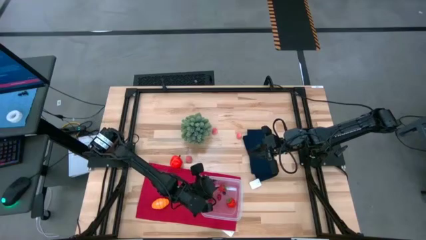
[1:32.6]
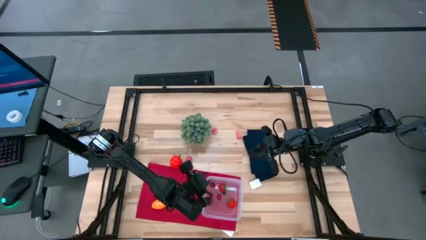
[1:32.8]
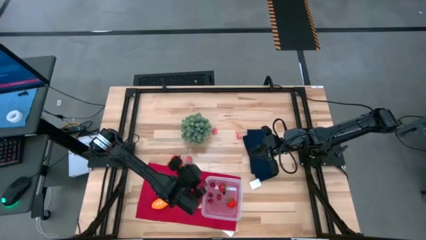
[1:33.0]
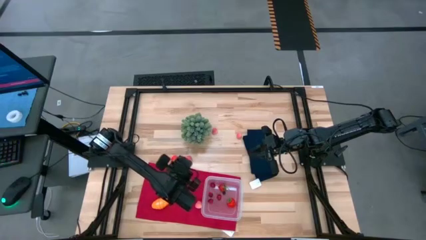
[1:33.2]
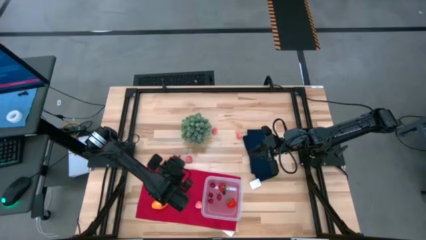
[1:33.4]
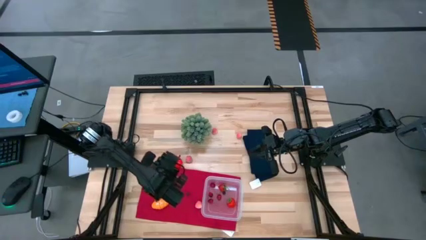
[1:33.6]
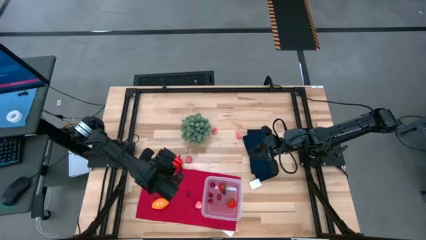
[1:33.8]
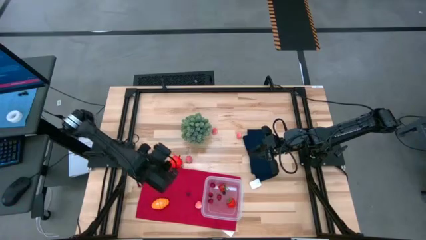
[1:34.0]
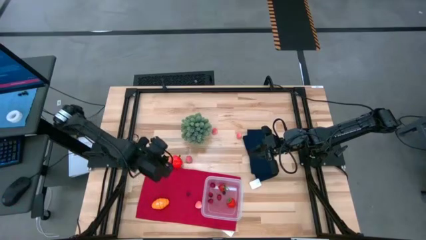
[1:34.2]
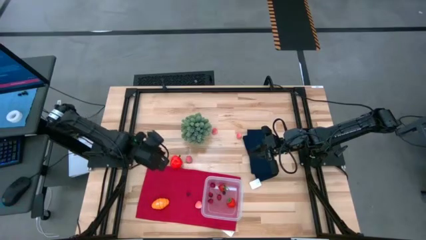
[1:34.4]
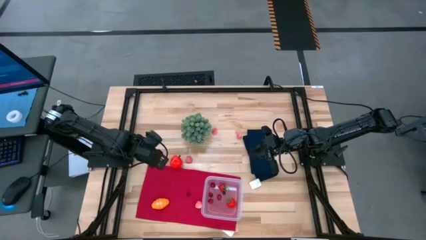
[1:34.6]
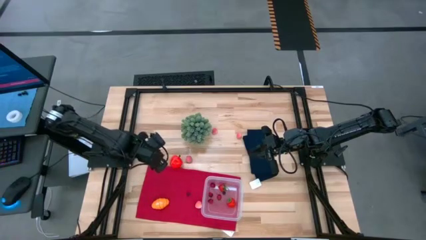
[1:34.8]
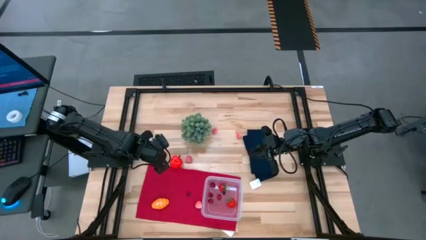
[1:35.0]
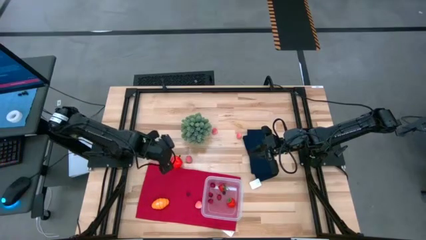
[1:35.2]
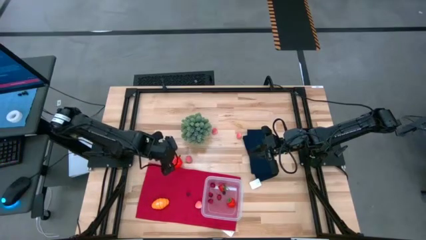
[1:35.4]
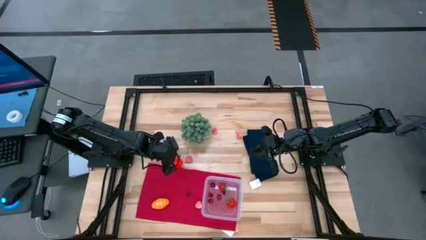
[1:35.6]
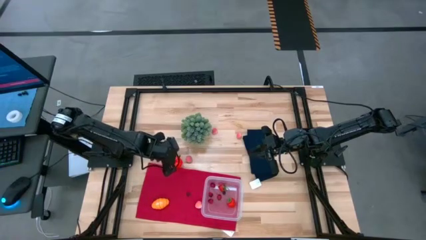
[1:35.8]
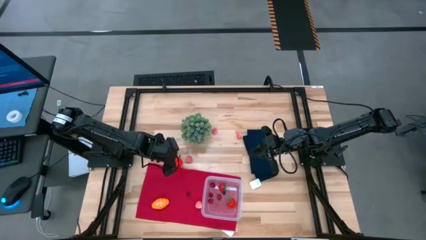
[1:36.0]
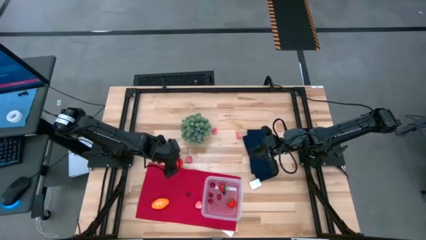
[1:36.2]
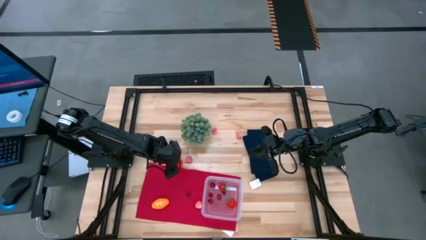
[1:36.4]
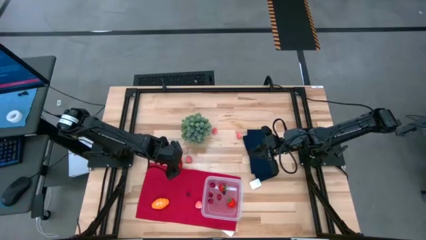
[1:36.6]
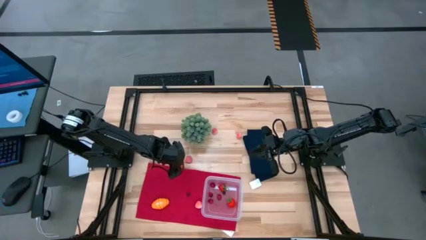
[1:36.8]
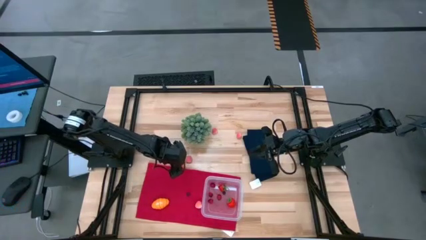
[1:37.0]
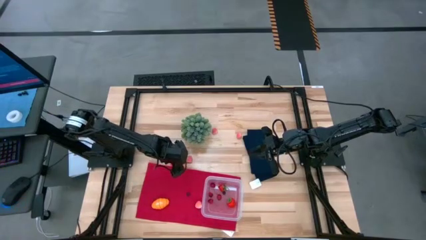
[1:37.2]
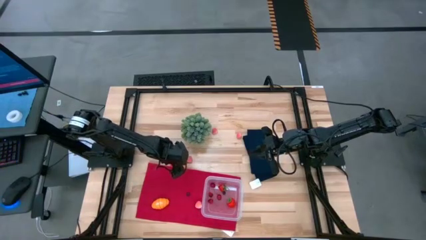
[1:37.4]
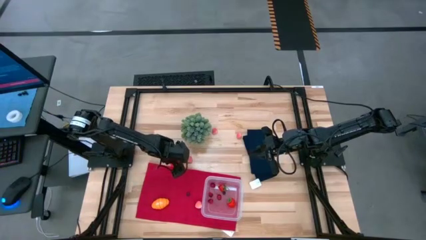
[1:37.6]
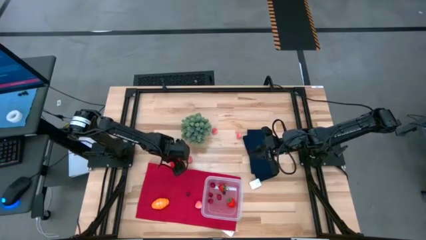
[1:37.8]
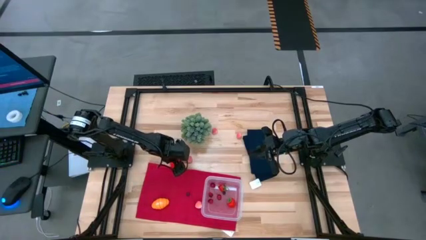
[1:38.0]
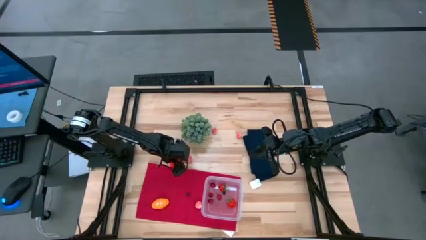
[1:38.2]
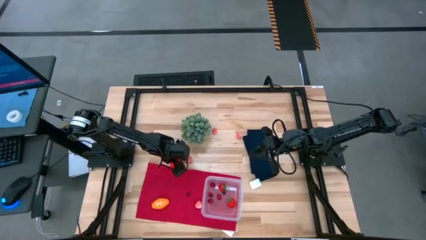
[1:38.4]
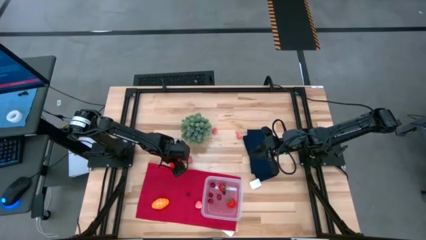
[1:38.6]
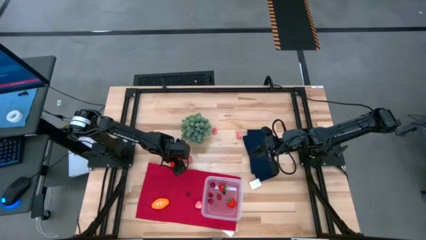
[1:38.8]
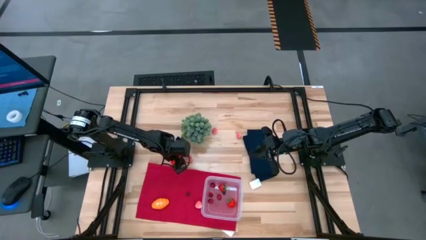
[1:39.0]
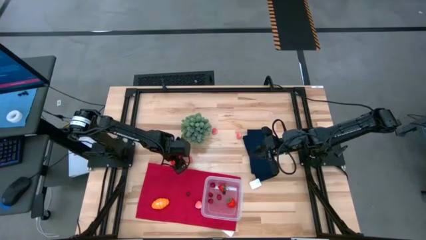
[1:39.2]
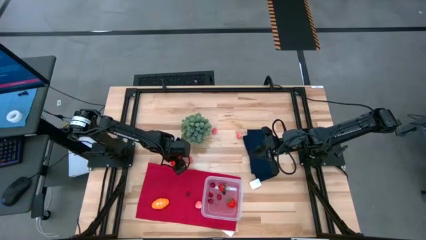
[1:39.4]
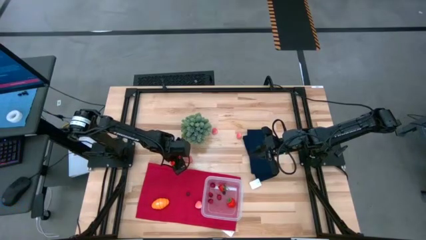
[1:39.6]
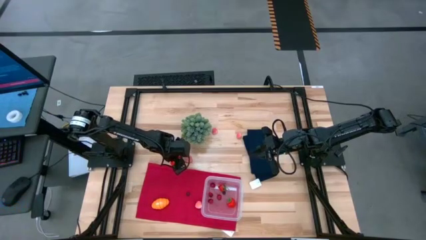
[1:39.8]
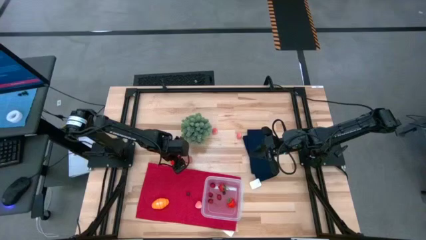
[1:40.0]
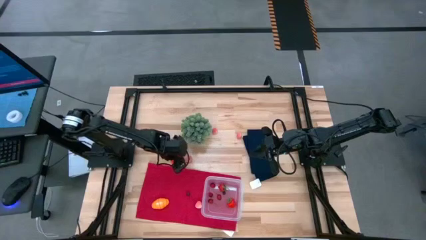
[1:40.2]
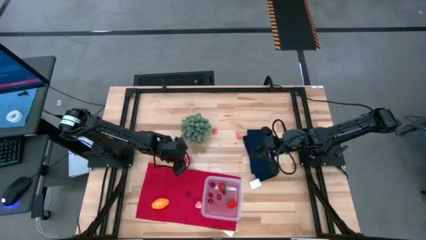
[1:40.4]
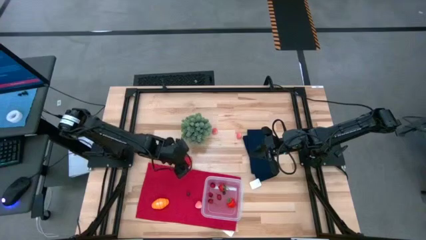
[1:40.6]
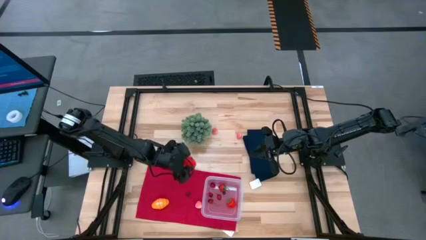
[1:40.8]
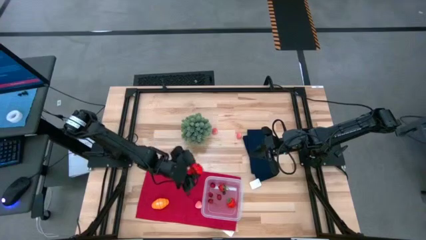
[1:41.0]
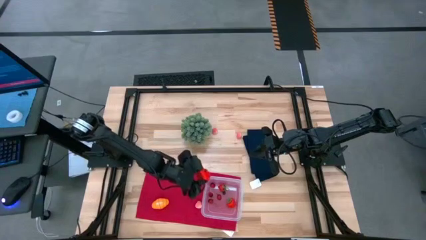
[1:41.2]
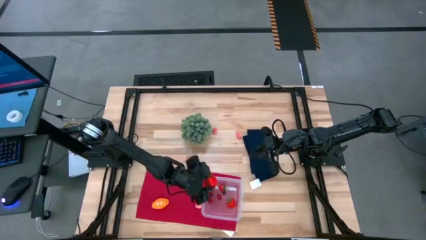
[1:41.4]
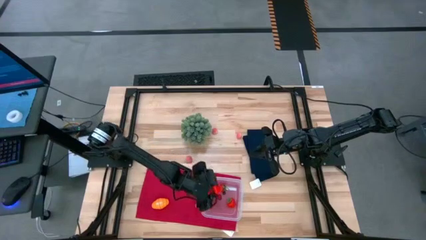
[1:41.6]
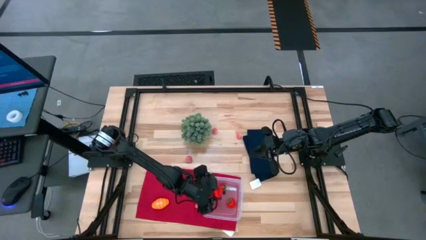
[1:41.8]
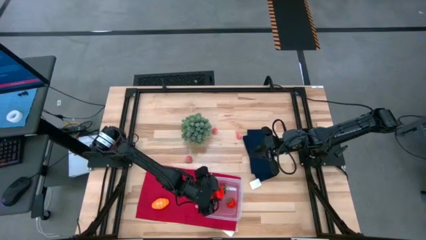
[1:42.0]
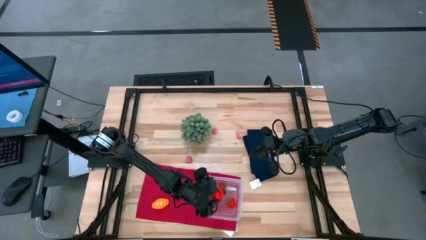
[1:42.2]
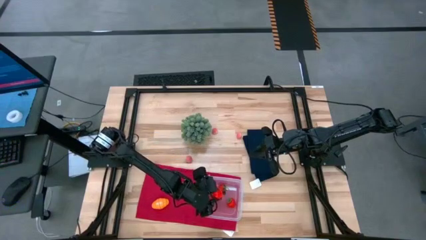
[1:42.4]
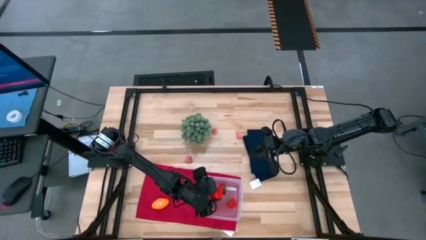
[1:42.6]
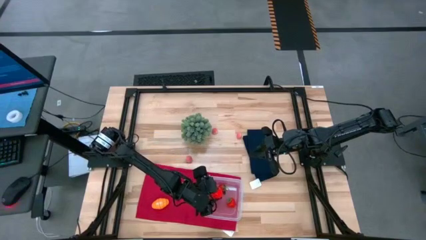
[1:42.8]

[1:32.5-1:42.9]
Task: Pick and placing Produce into tupperware
Put the apple into the transparent bin

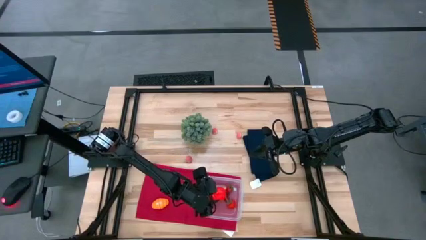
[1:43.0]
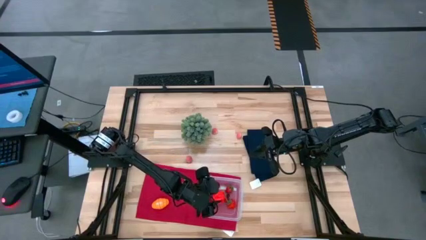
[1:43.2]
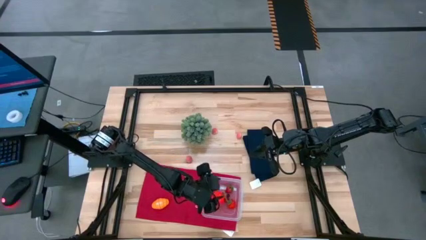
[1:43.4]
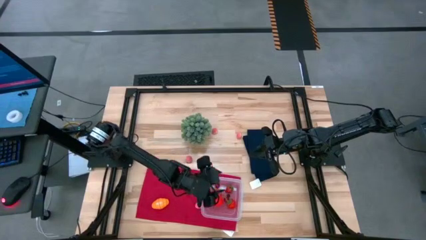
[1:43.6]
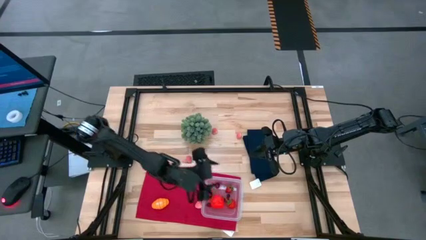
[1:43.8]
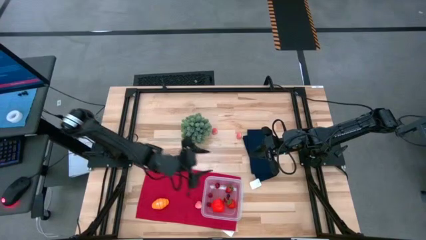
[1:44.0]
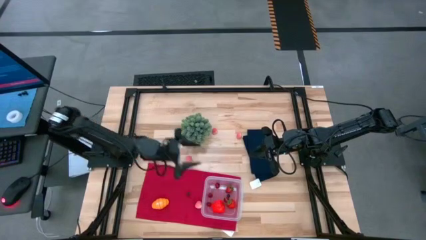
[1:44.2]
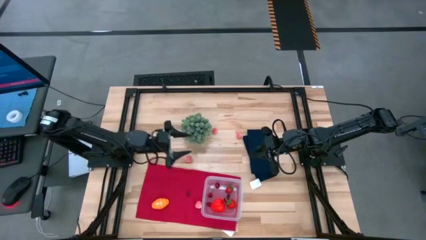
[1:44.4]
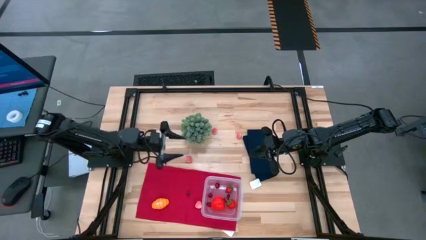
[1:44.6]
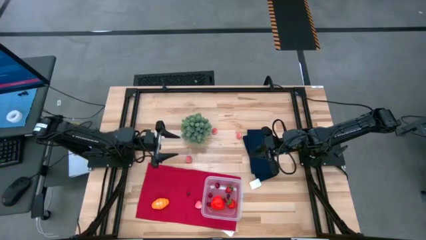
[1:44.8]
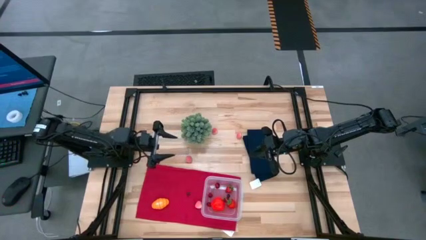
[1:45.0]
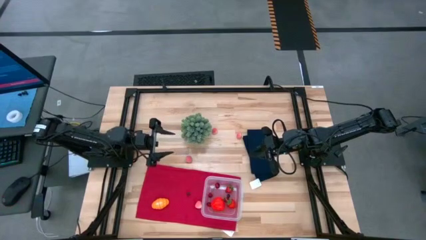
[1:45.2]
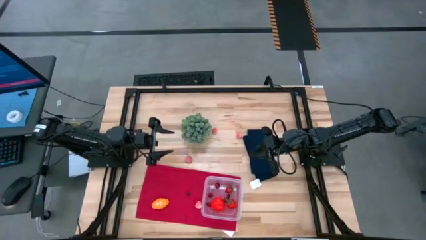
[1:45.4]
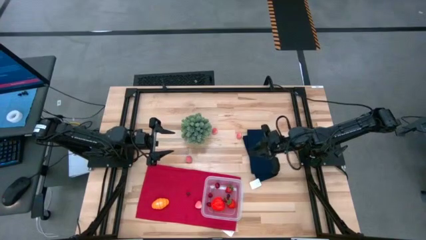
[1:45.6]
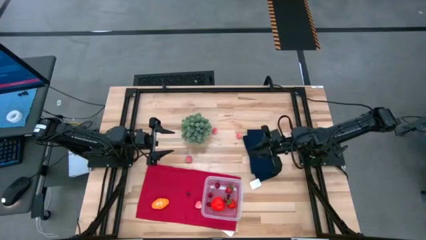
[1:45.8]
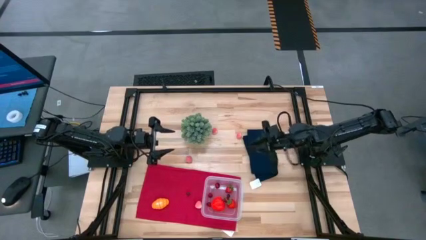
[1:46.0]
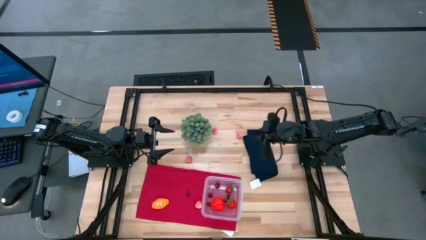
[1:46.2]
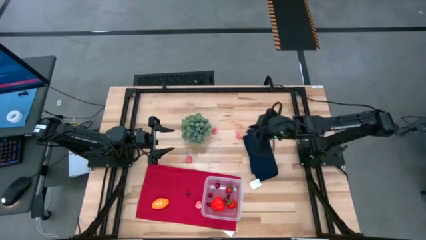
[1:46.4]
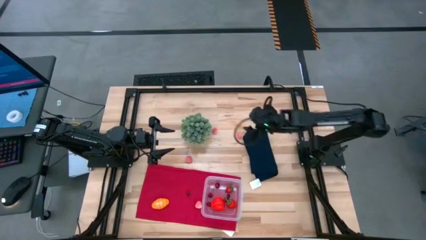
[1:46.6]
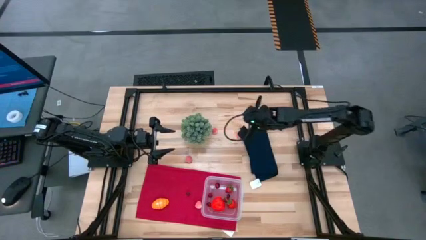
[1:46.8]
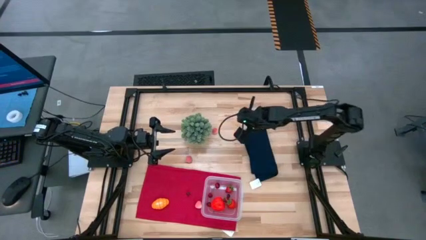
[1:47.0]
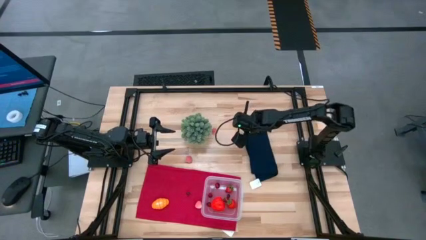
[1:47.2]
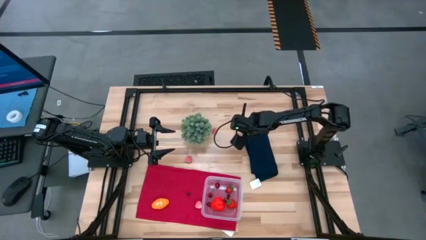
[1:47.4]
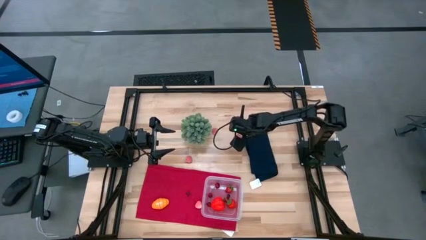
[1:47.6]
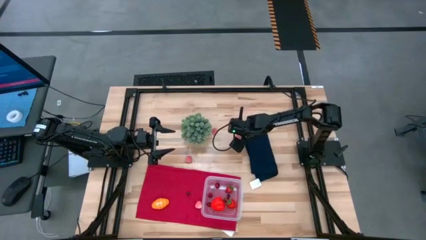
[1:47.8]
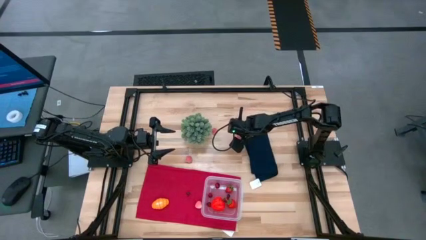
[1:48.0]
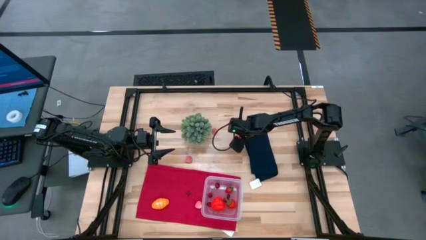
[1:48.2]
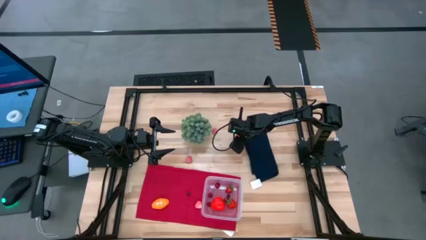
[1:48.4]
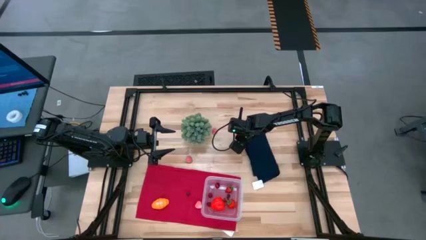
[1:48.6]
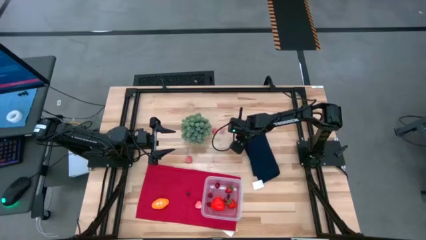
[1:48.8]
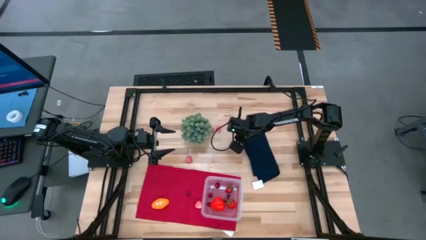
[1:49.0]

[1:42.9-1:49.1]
Put the apricot into the transparent bin
